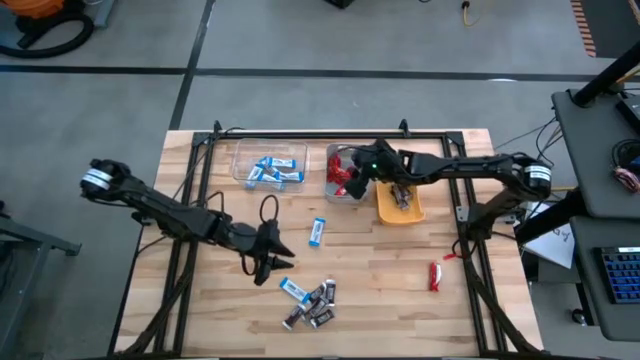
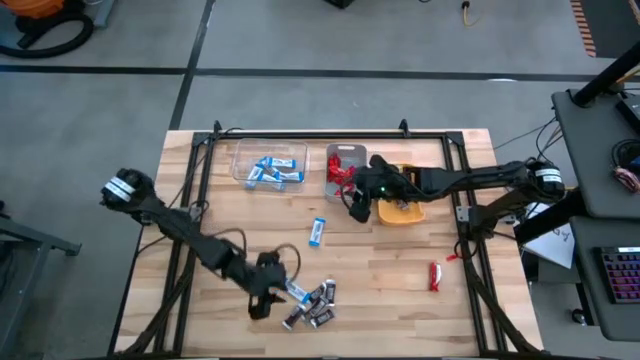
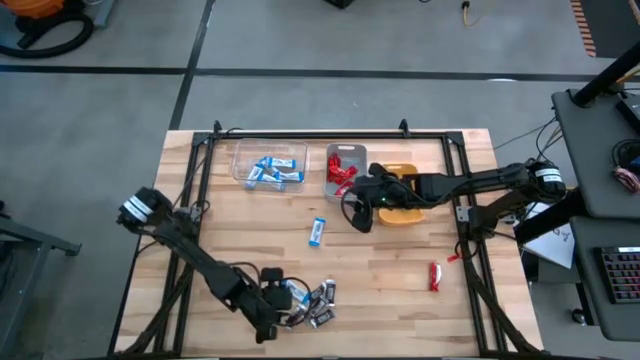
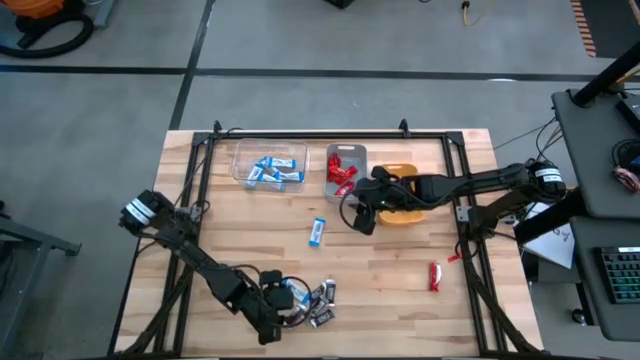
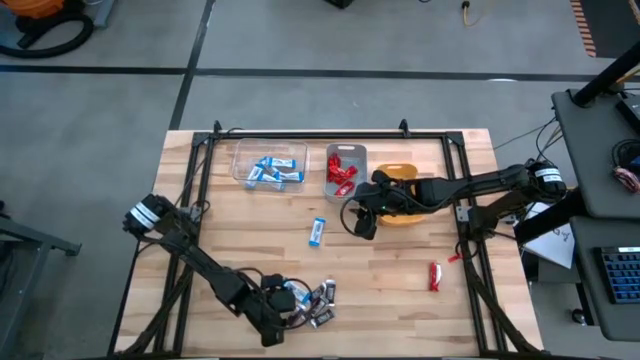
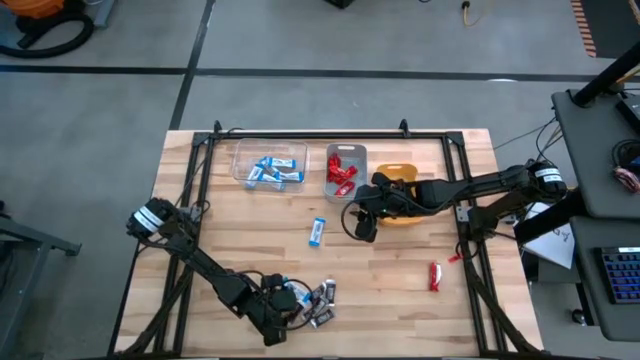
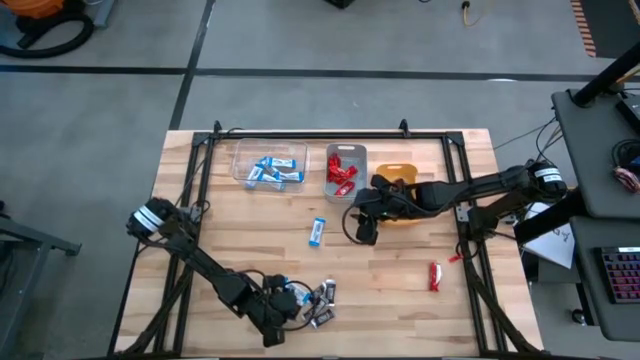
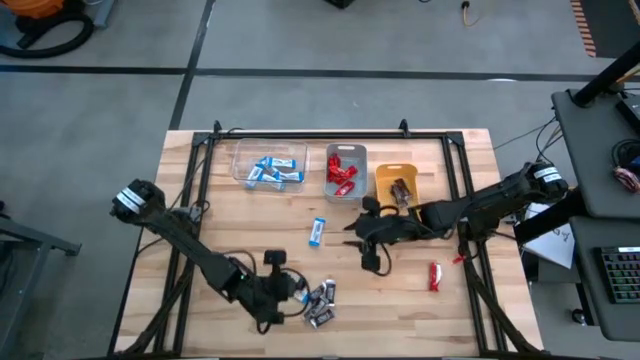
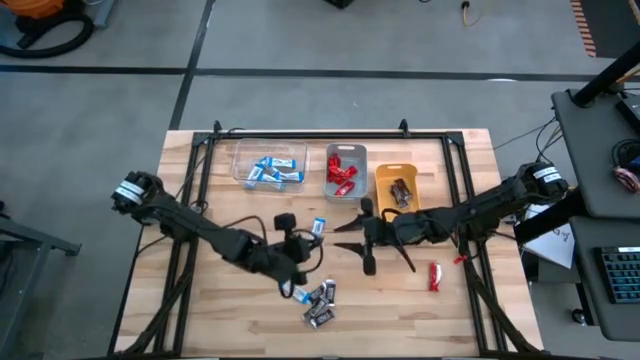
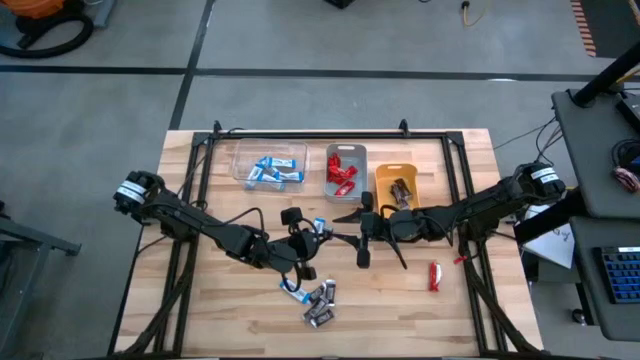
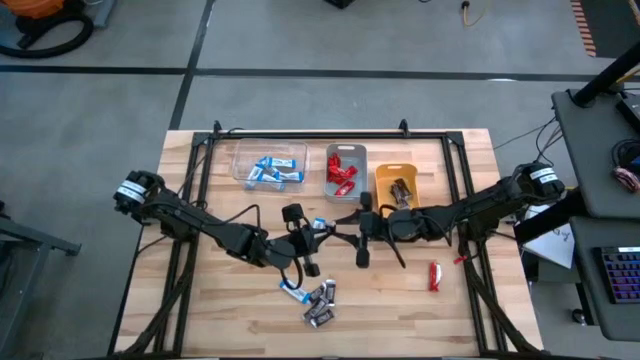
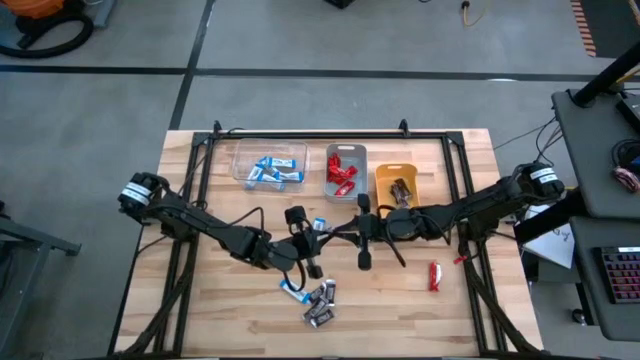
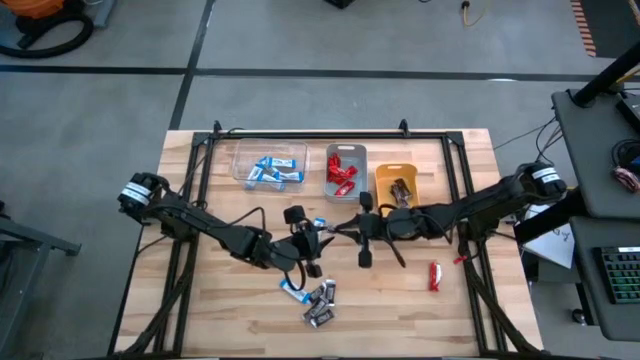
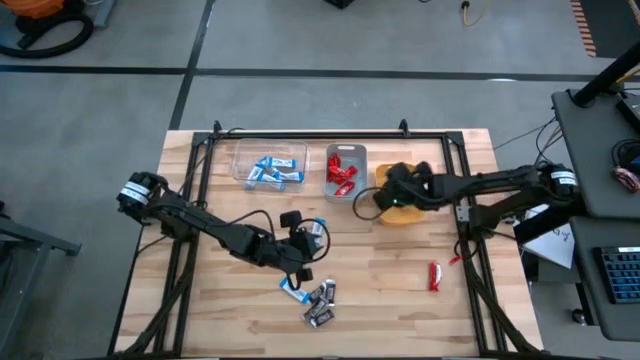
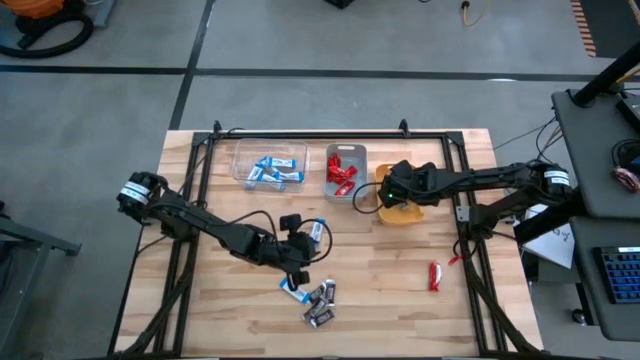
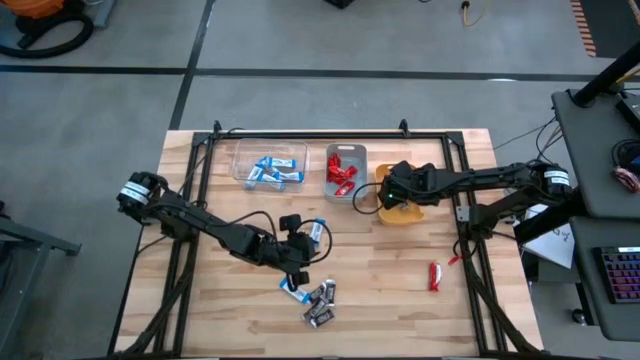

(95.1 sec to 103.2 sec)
Task: Organize candy in baskets
Put the brown chocolate into the yellow bin

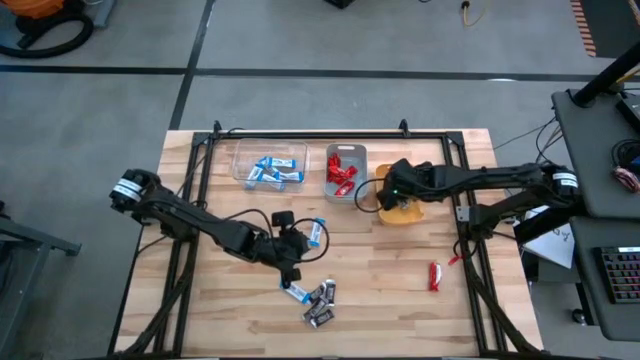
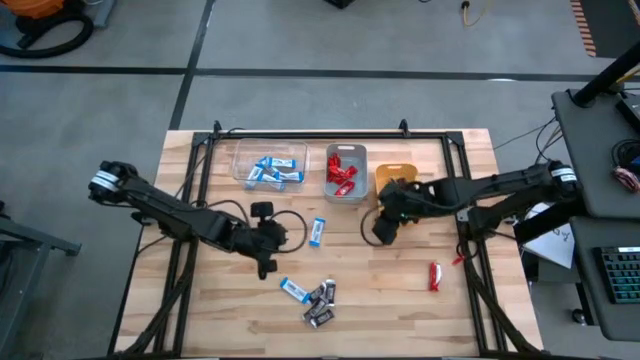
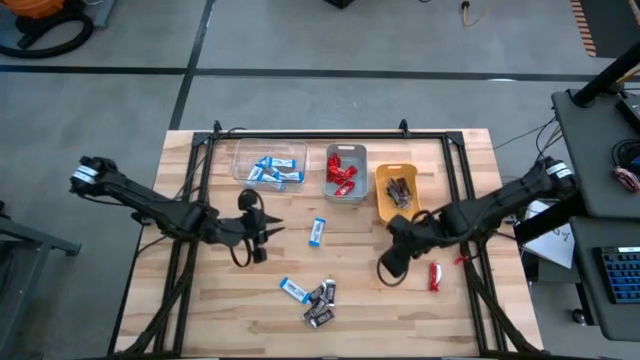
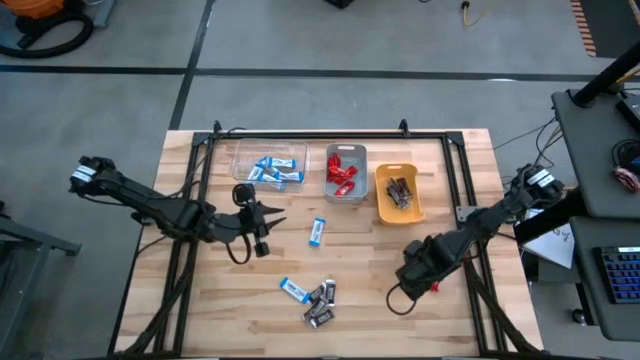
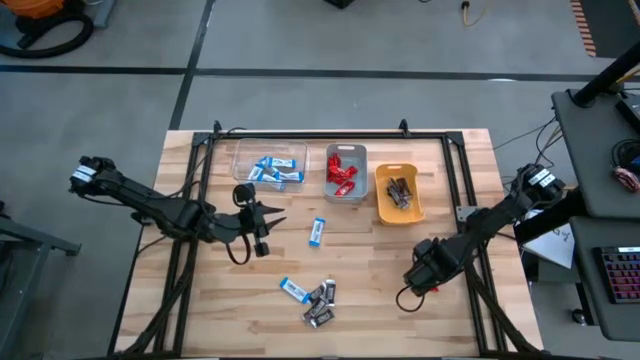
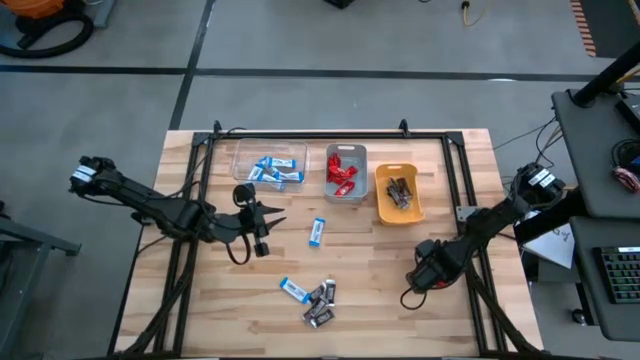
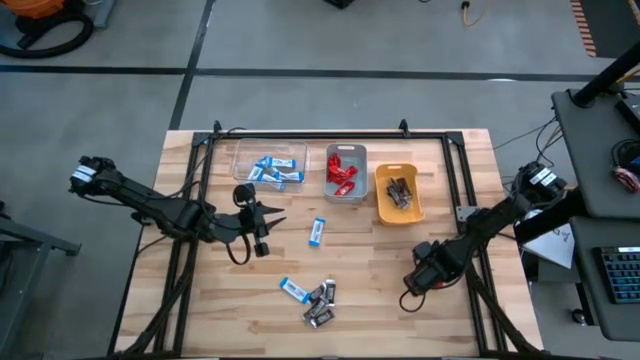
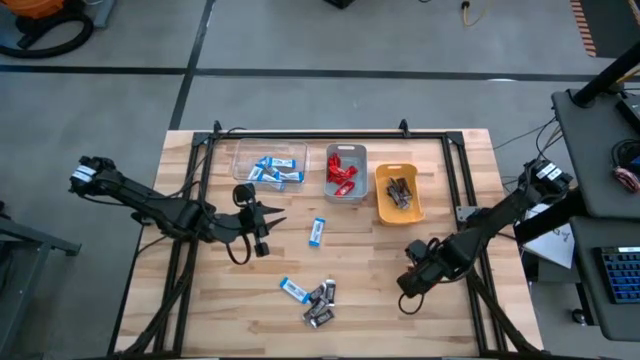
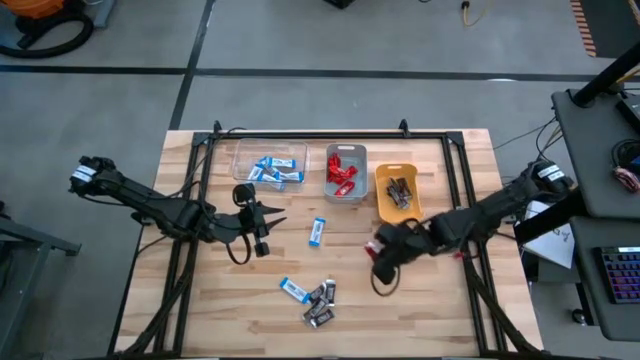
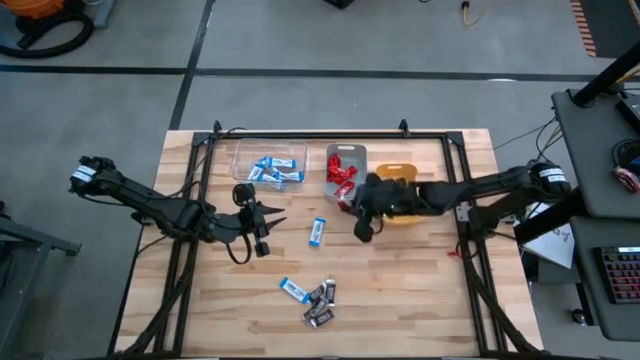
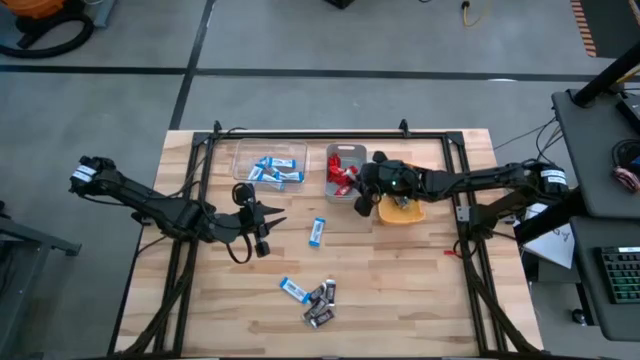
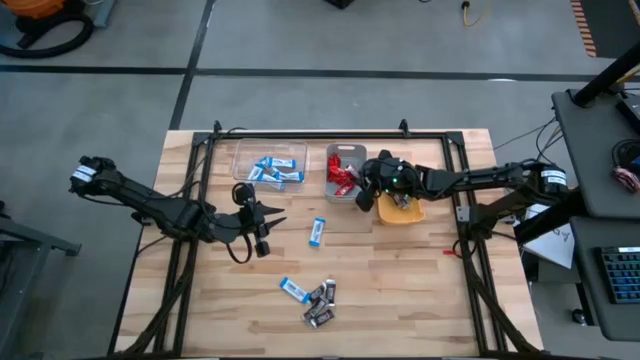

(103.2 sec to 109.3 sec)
Put the red chocolate into the gray bin

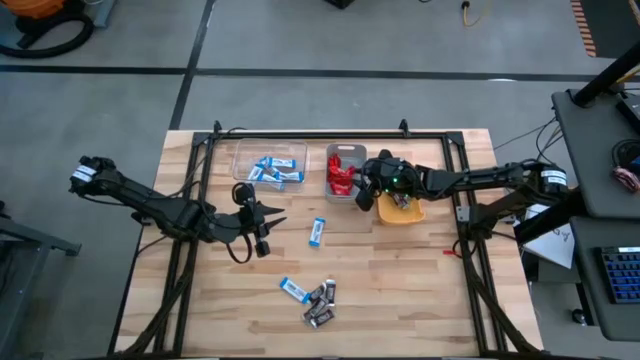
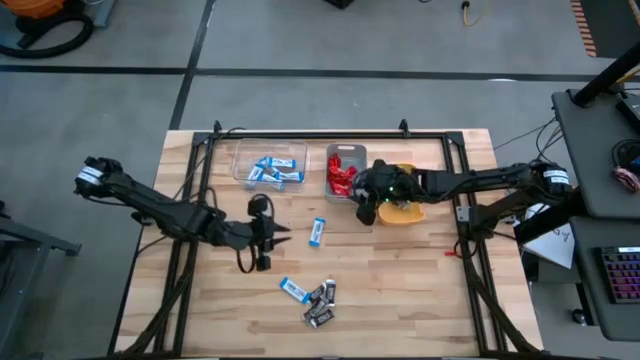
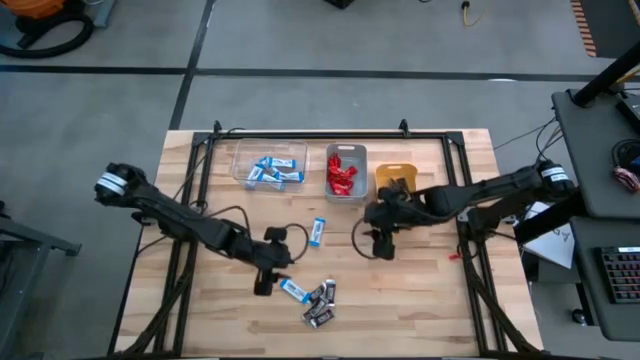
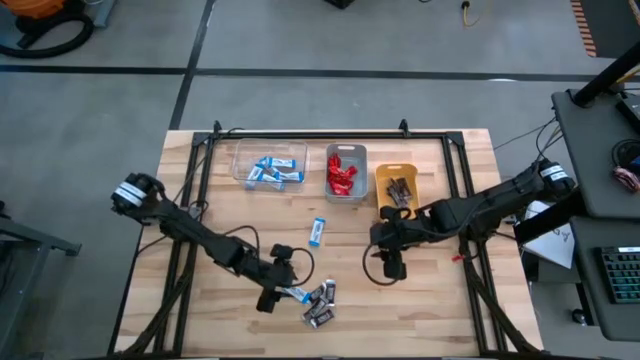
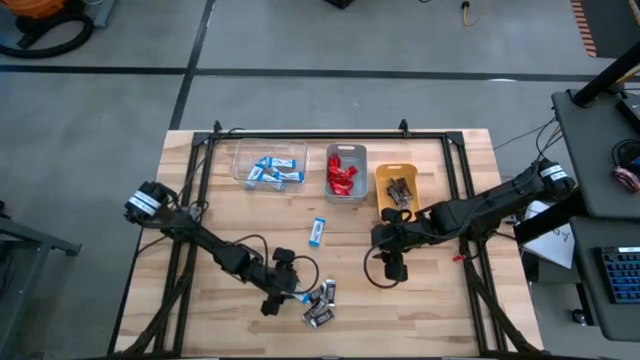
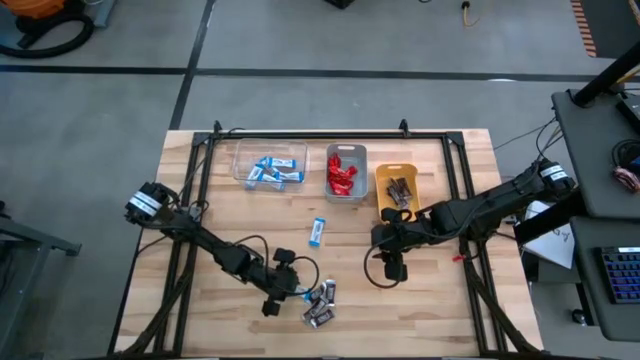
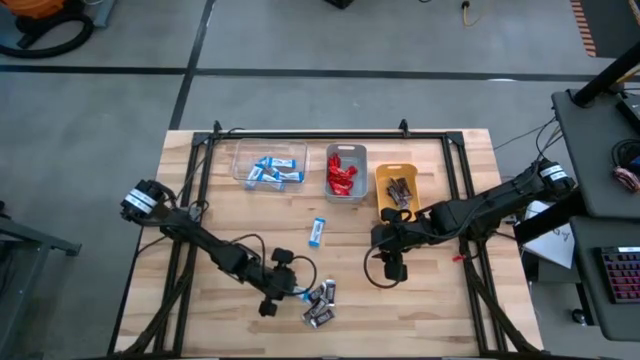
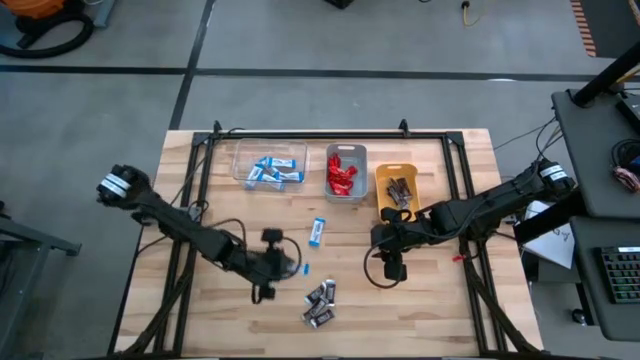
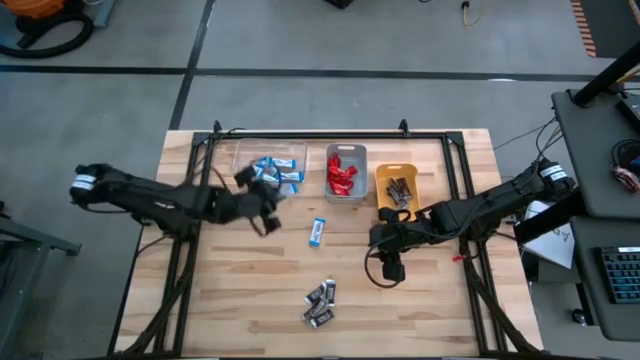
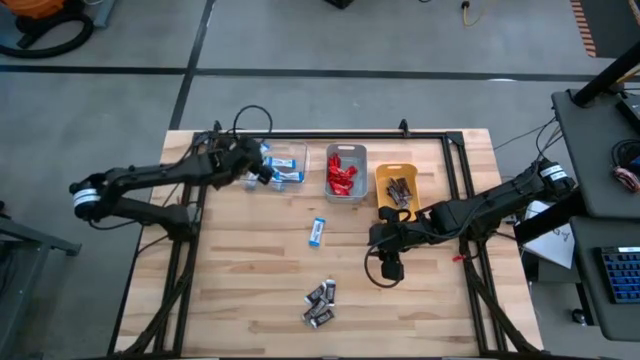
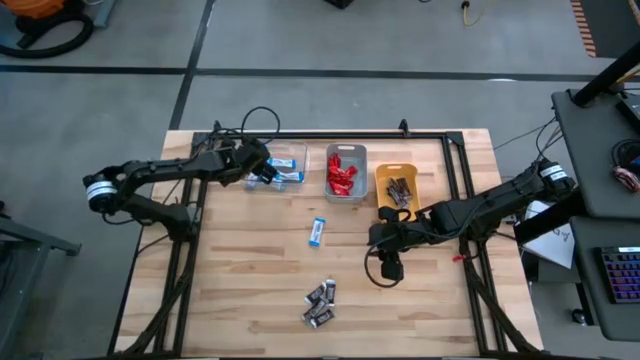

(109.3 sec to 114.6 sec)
Put the white chocolate into the transparent bin

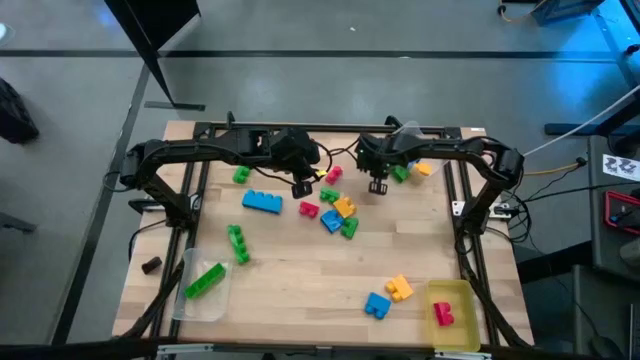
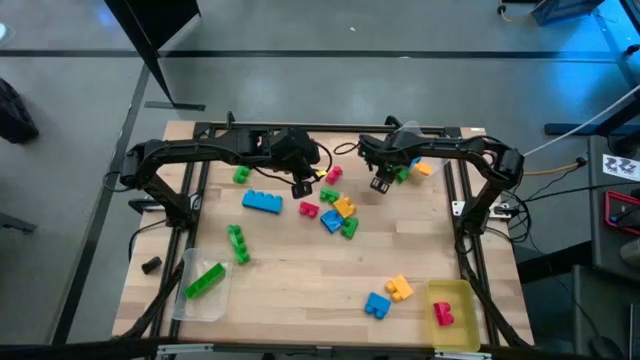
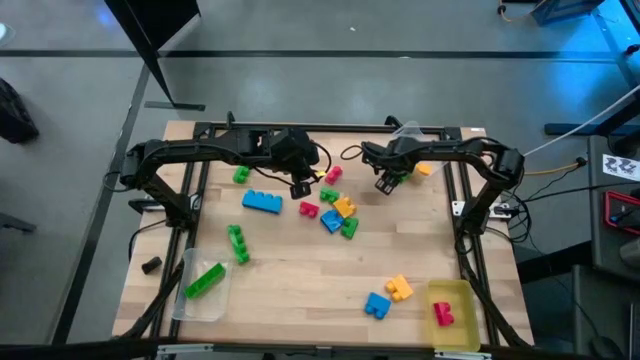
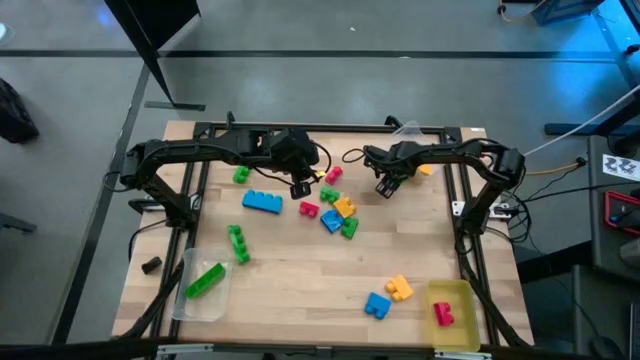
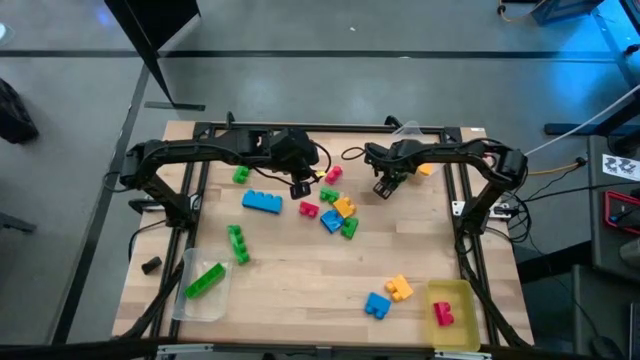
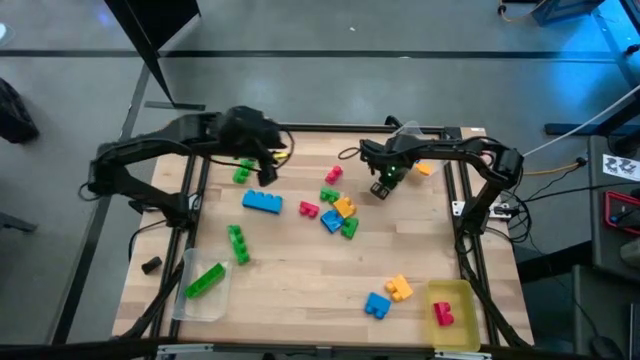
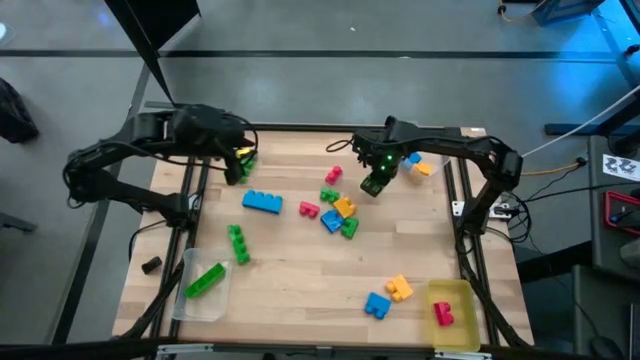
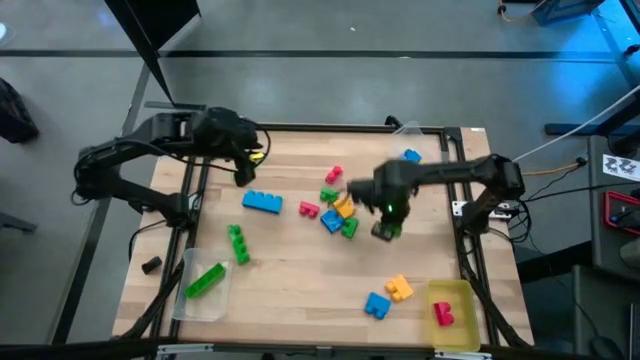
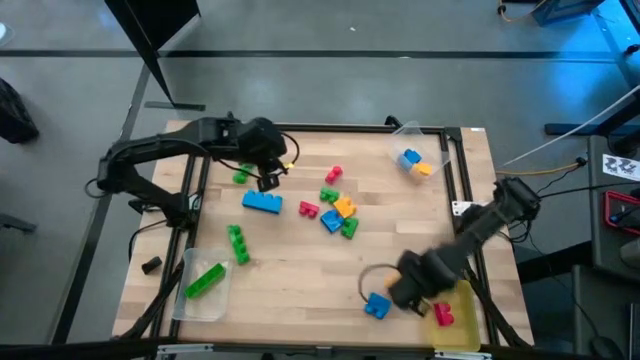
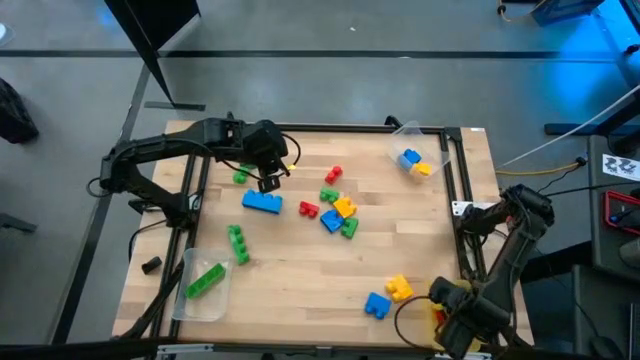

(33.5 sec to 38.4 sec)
Task: Sort blocks by size
Put the top right 2 stud green game piece into the yellow bin
